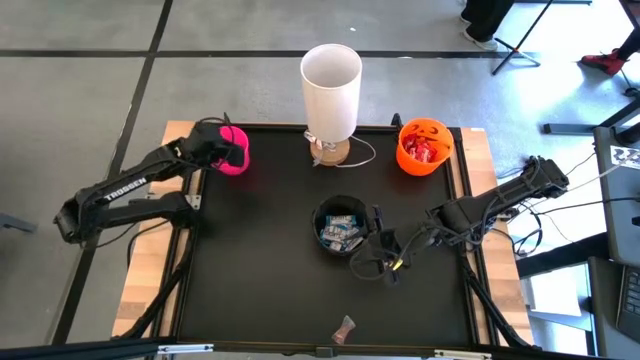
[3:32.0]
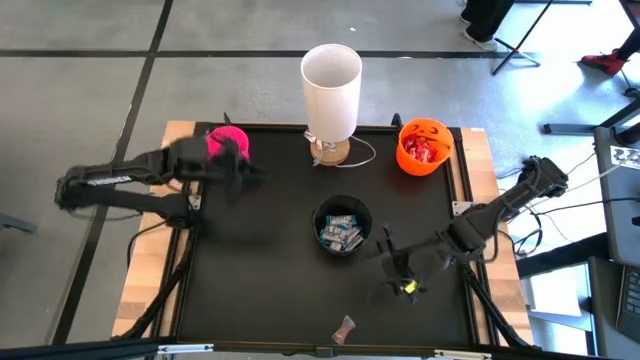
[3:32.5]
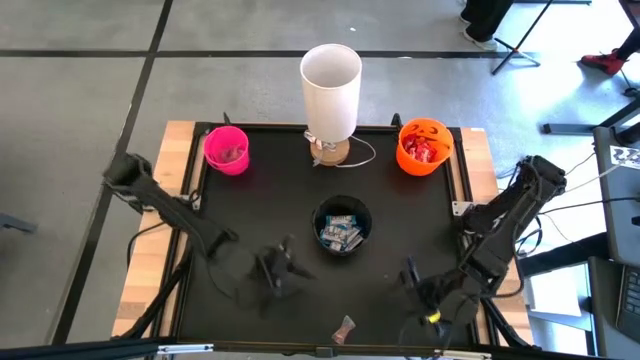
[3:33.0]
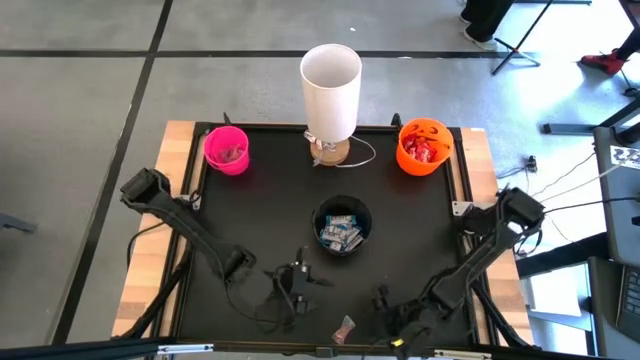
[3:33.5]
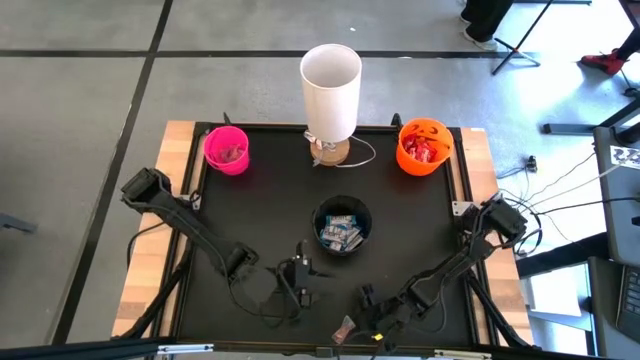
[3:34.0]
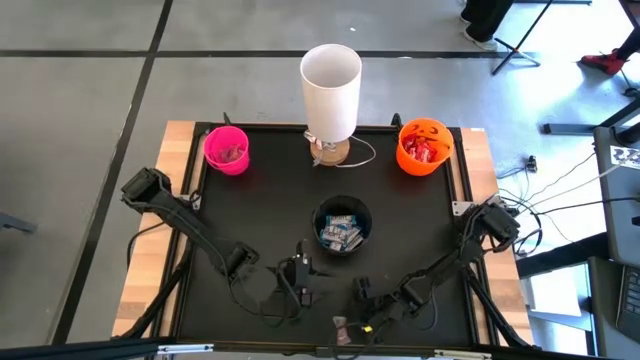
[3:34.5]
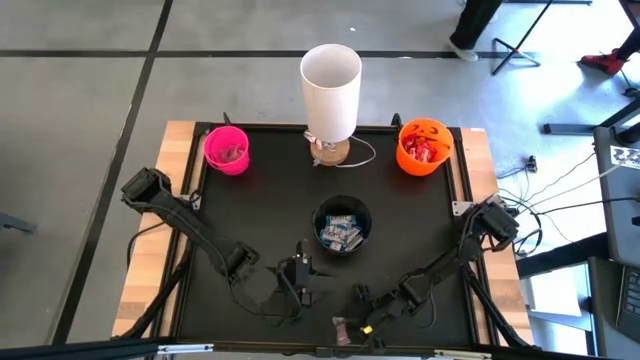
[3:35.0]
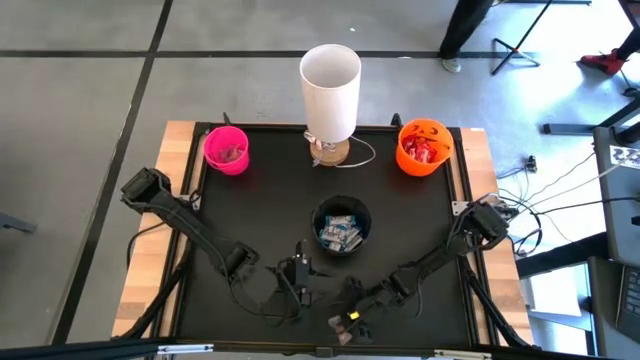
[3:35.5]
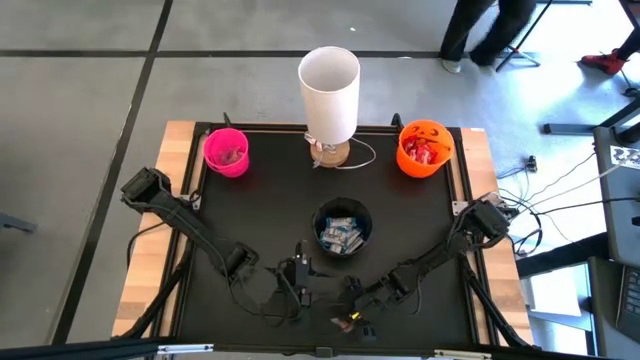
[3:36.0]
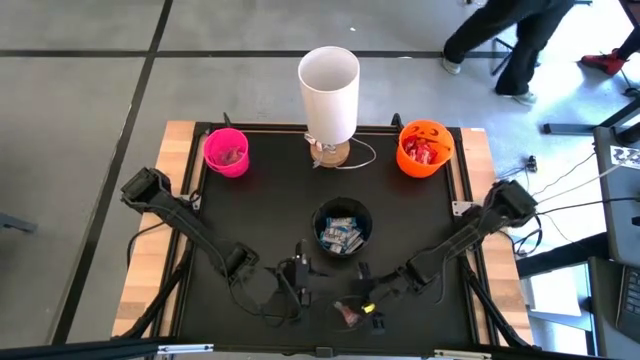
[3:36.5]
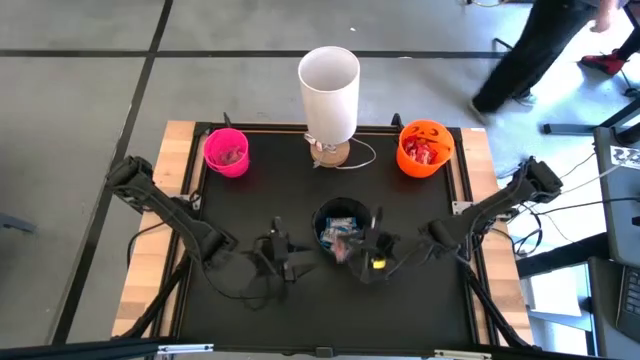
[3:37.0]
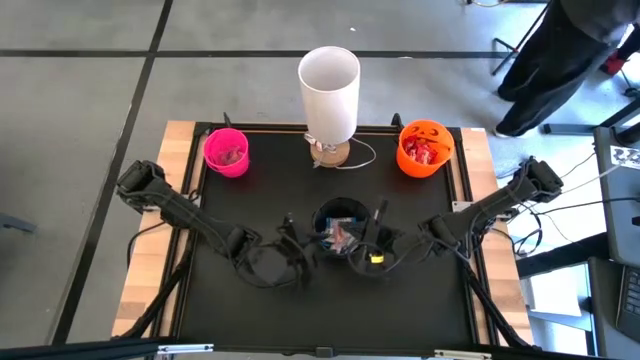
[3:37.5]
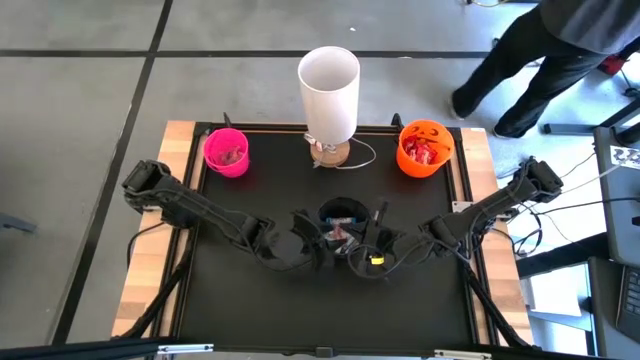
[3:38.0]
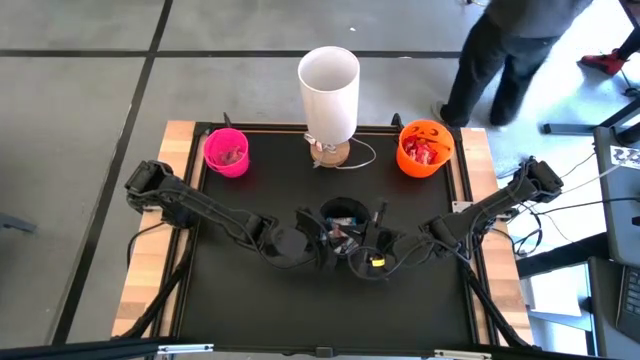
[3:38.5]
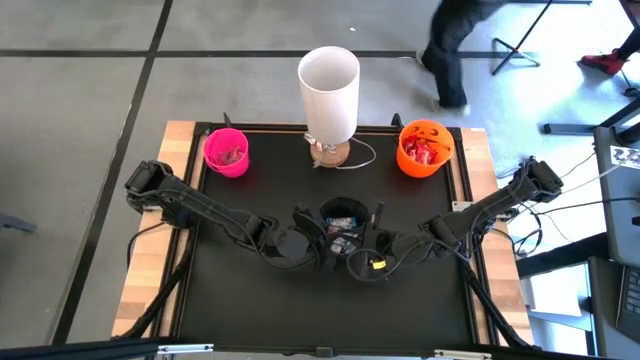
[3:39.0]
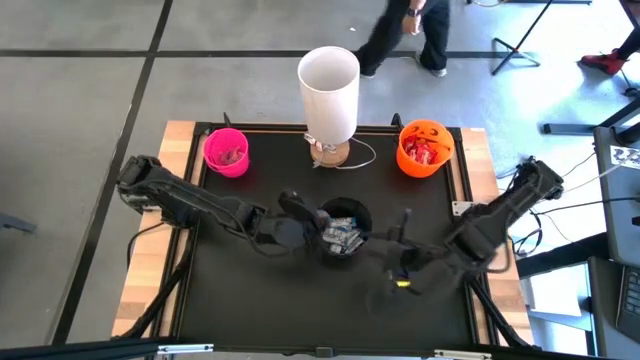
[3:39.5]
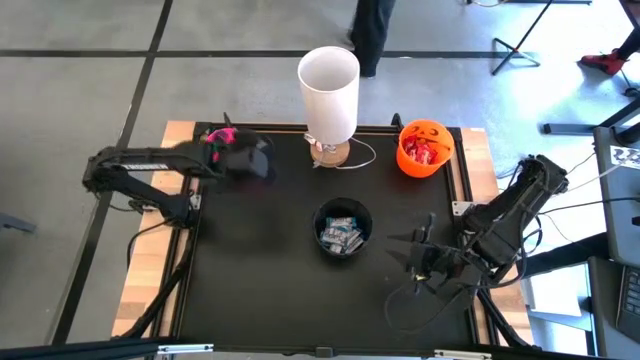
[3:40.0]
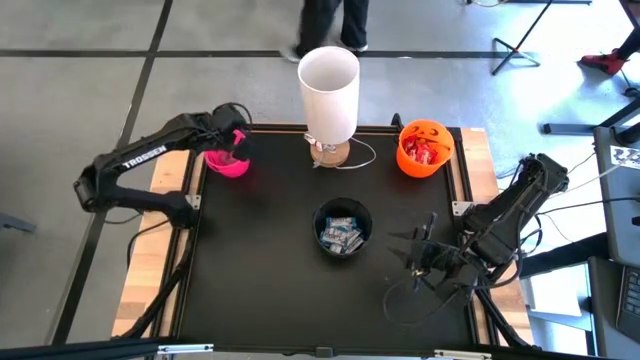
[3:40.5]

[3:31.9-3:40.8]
Task: Sort candy
Put the orange gummy into the pink basket

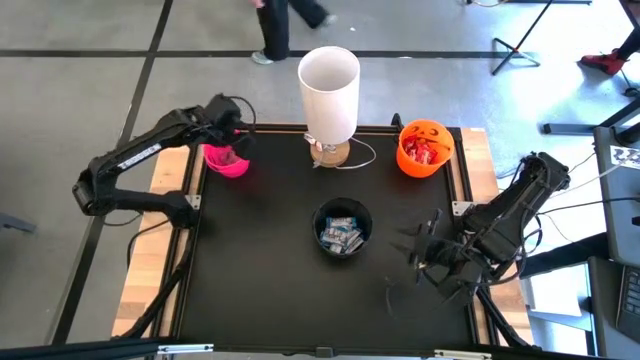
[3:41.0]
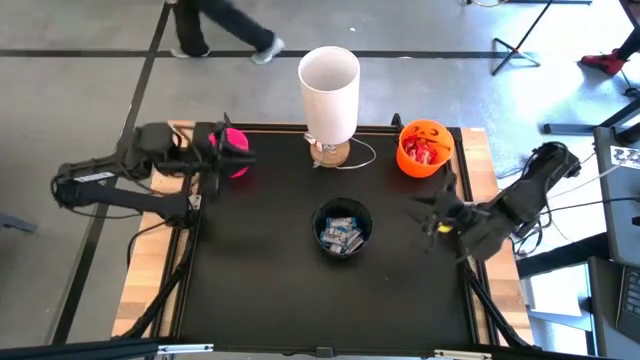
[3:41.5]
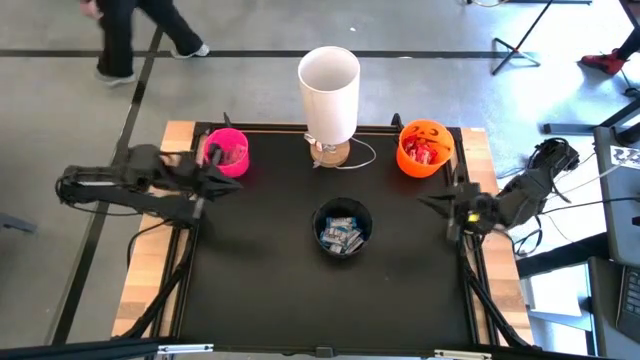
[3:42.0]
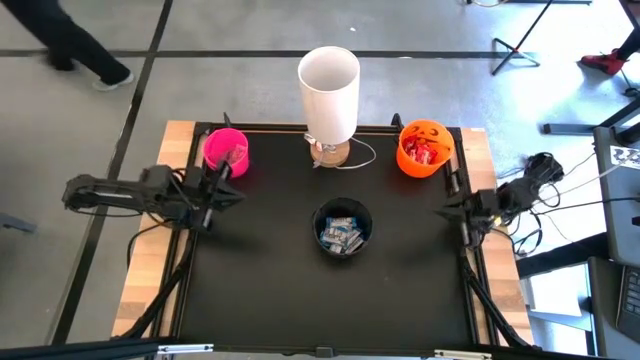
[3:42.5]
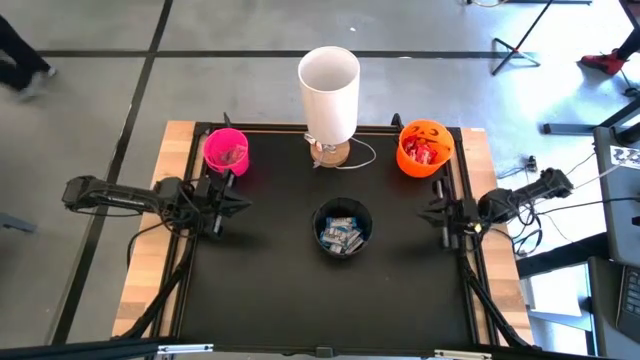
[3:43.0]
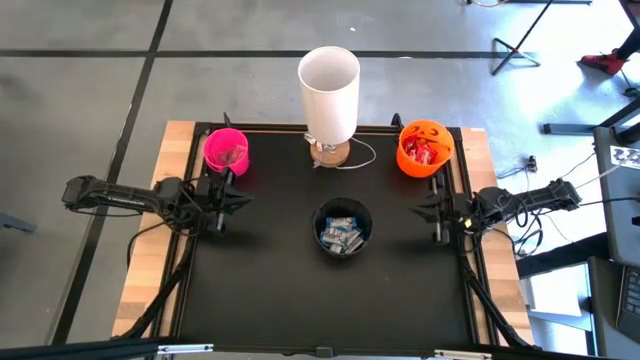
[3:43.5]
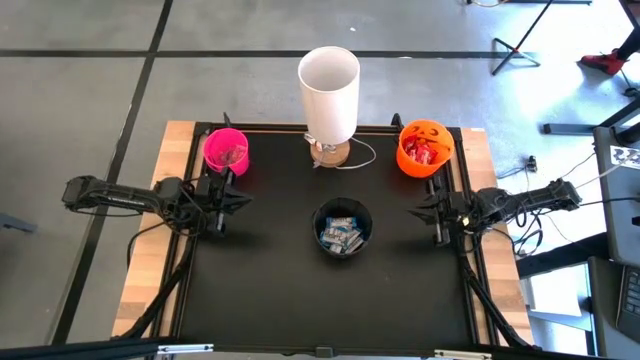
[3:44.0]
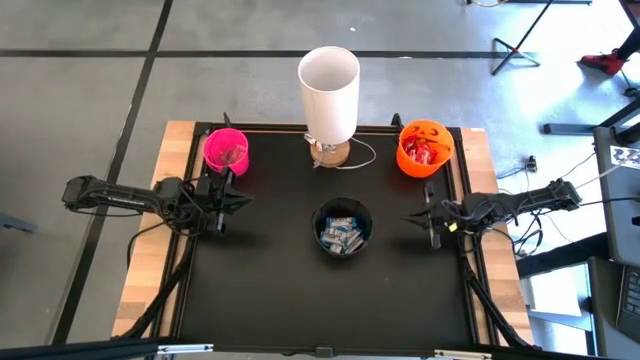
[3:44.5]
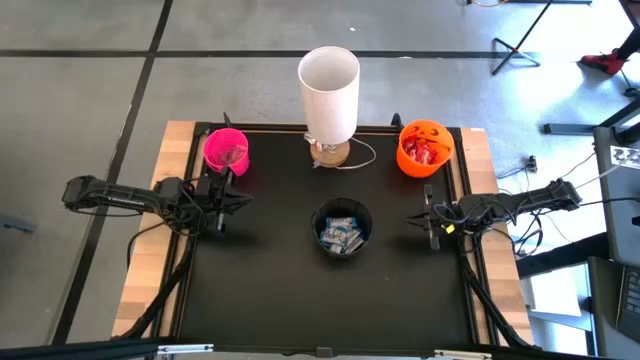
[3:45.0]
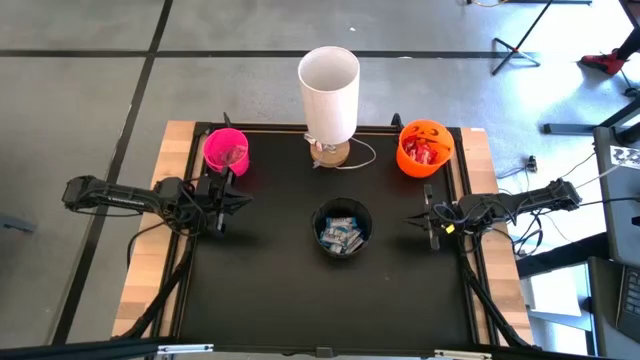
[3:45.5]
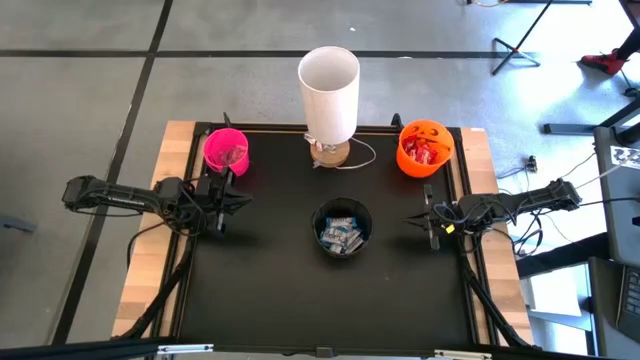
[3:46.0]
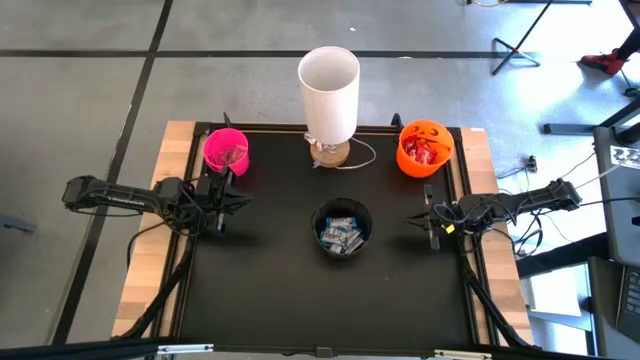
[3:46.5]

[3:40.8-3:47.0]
Return to Home Position
